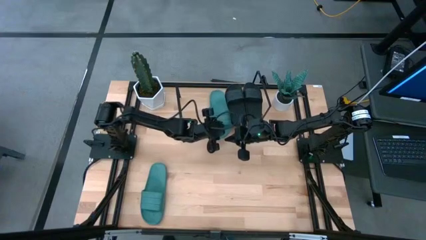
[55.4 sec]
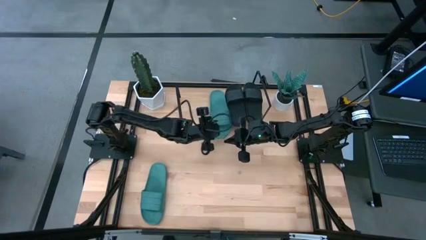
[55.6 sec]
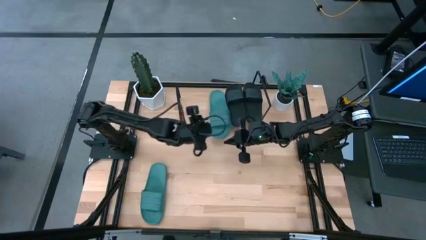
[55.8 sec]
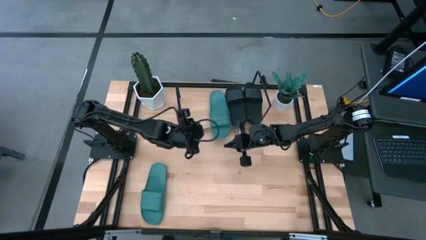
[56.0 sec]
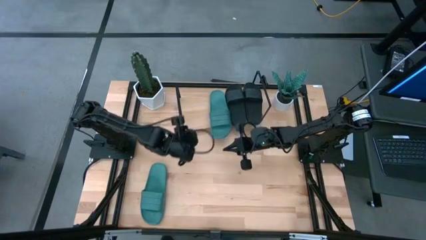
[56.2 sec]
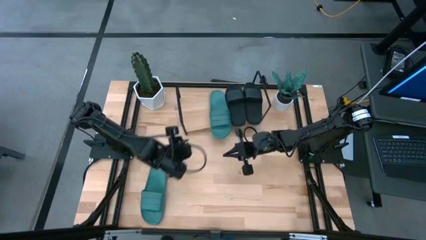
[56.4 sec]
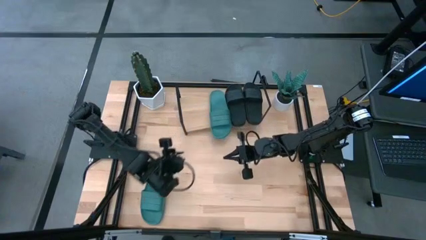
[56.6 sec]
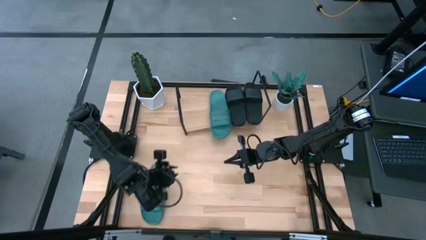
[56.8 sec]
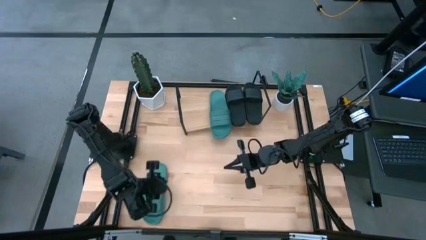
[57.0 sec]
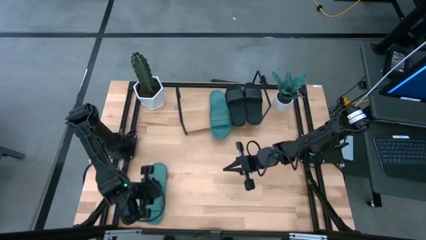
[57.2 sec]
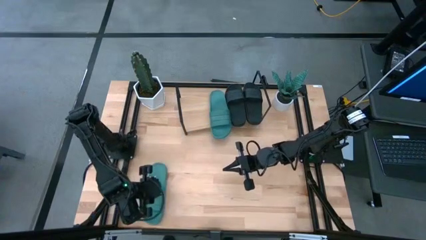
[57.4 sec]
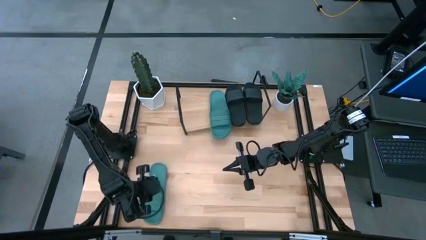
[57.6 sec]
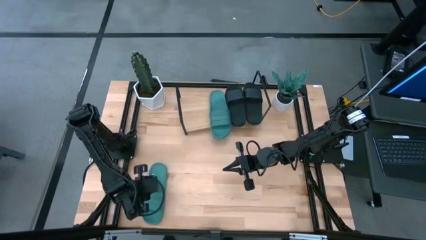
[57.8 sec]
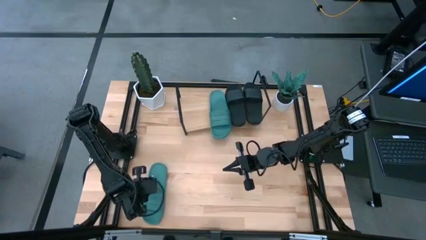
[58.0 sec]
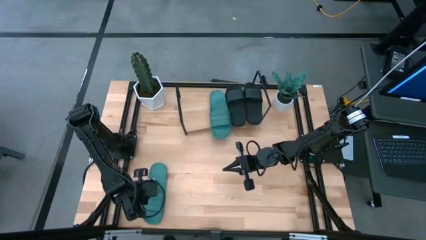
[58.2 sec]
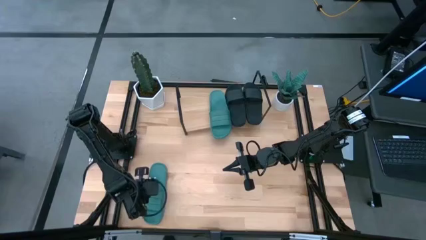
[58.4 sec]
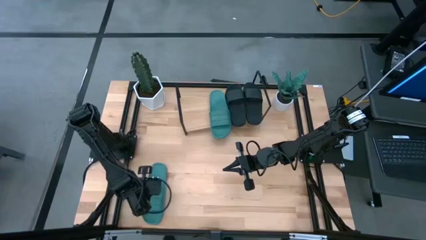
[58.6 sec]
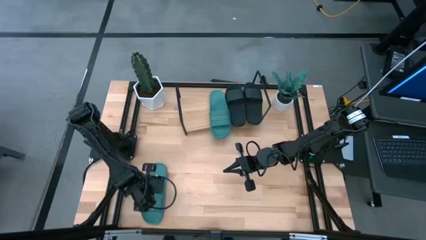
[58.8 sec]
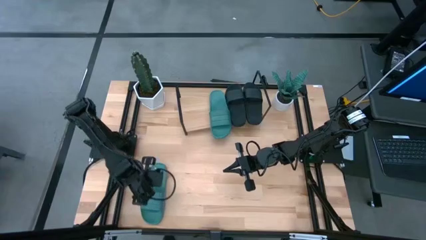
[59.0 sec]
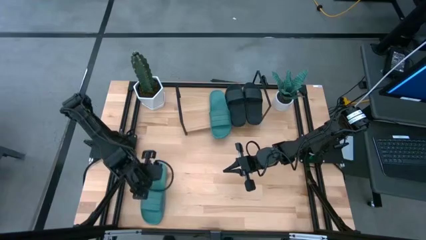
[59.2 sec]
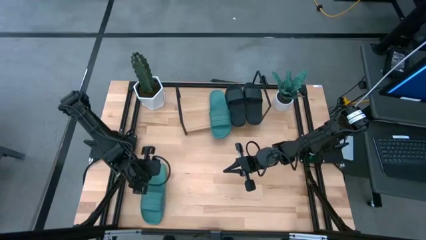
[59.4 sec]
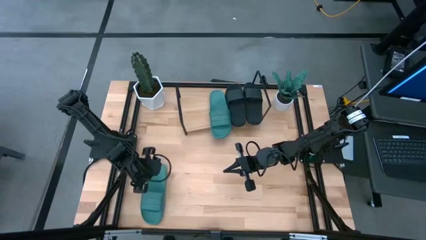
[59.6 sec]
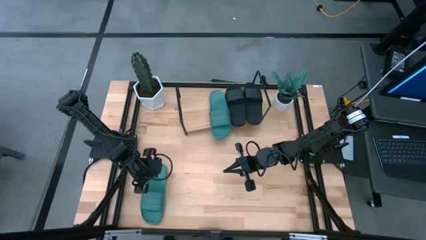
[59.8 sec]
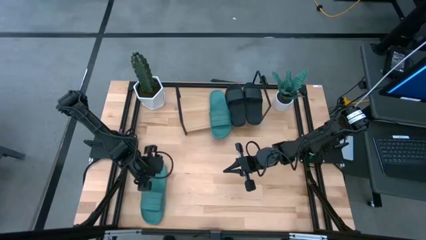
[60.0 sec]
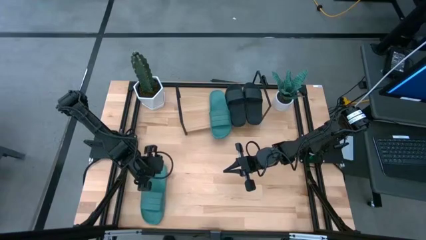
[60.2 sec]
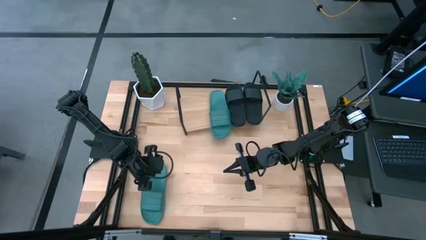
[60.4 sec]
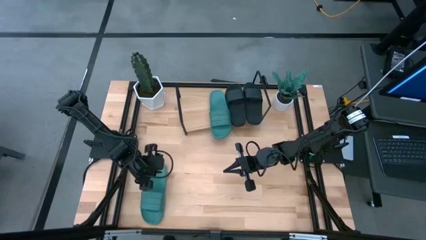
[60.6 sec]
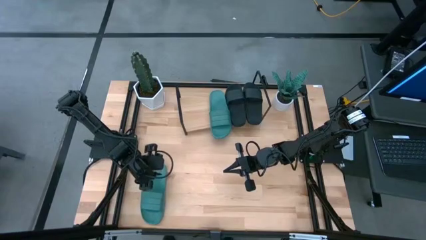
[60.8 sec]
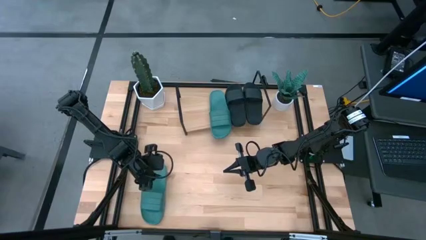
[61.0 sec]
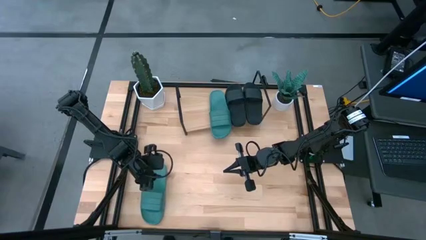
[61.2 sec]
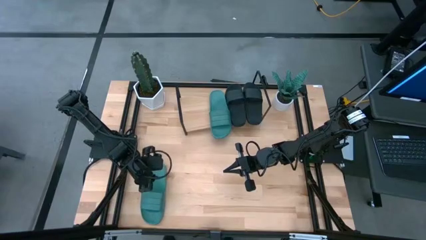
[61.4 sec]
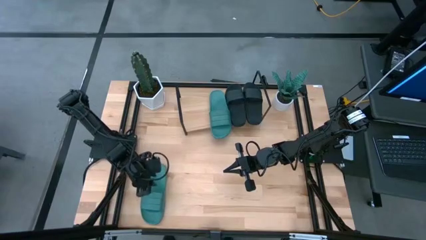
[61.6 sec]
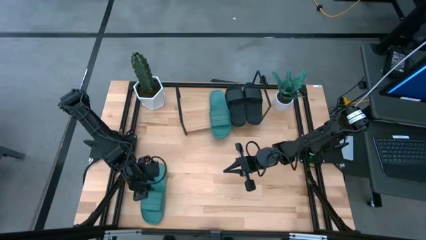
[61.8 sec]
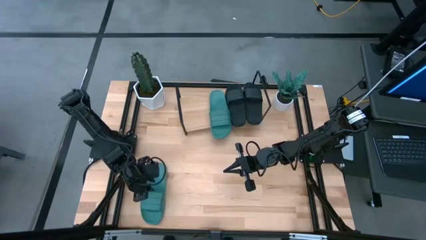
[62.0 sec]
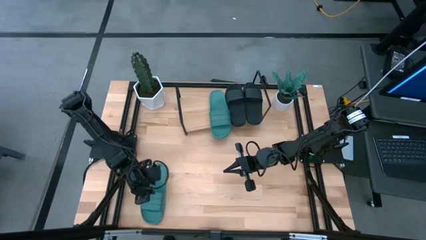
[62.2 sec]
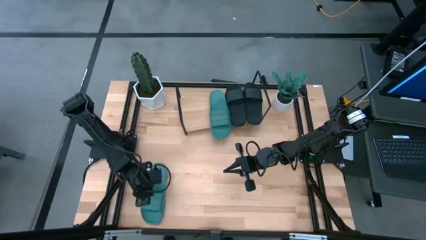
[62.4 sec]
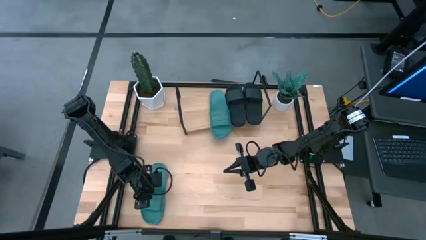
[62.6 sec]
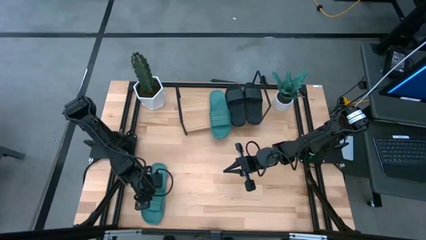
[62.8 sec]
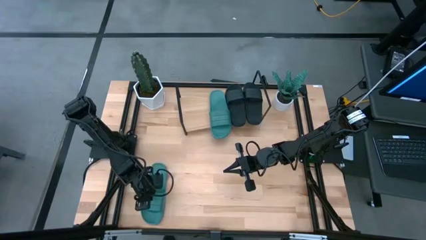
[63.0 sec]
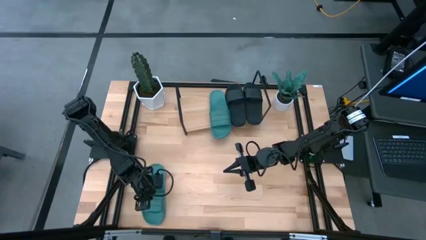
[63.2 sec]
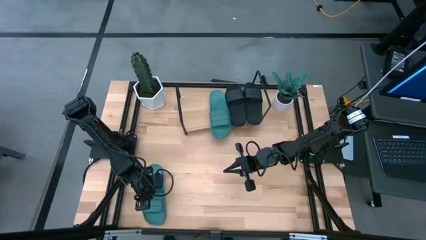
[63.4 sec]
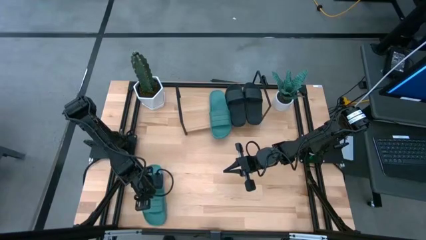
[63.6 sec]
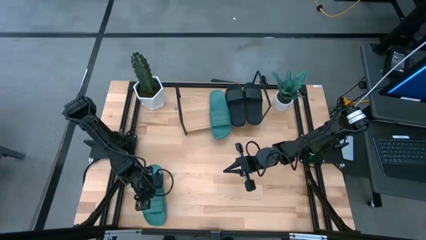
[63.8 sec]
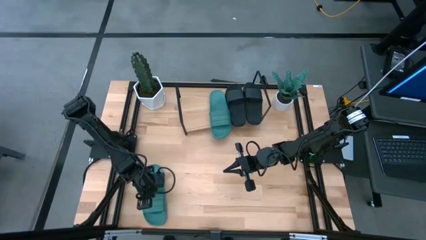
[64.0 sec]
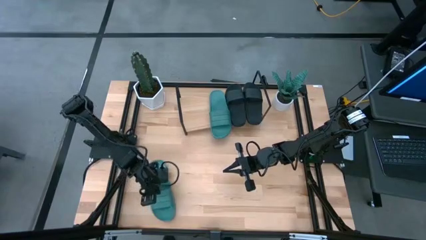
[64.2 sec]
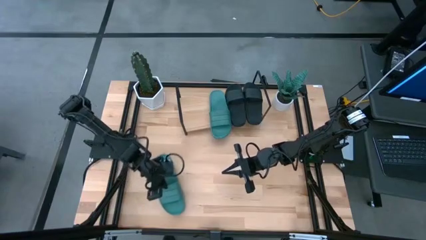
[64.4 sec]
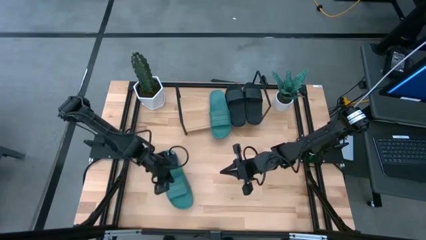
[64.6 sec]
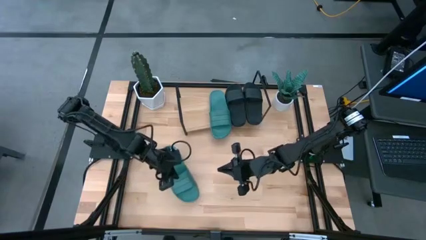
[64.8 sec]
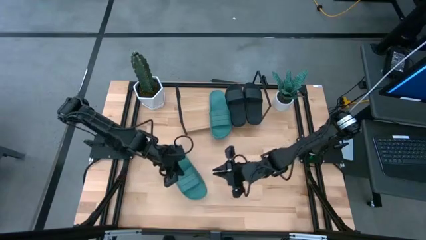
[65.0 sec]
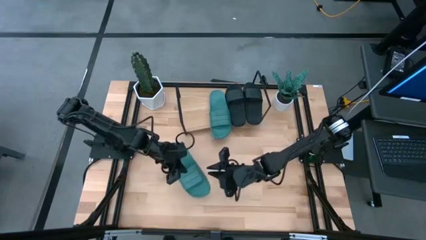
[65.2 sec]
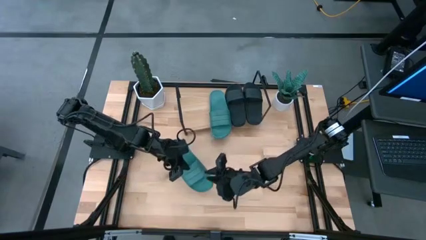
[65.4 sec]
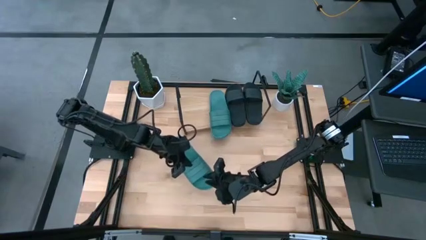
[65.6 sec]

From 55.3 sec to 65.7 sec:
Task: Pick and place slides into the shelf
Put the dark green slide on the shelf
